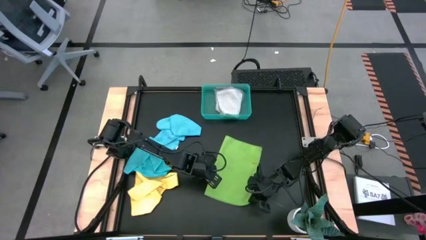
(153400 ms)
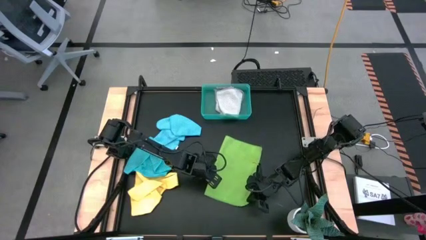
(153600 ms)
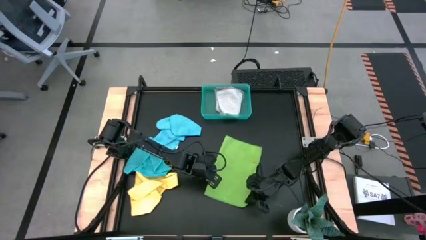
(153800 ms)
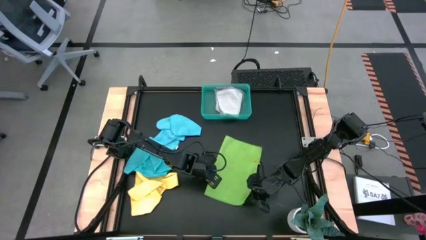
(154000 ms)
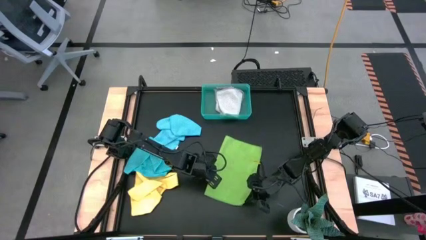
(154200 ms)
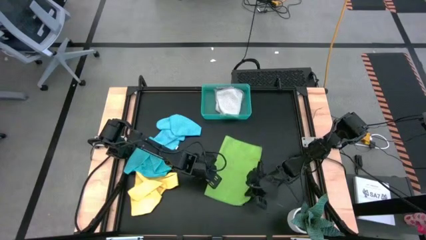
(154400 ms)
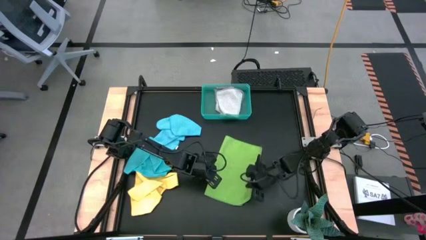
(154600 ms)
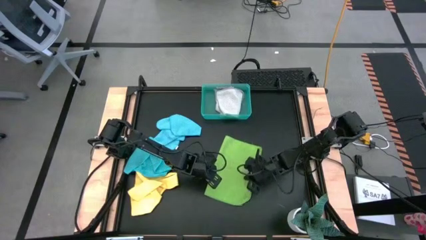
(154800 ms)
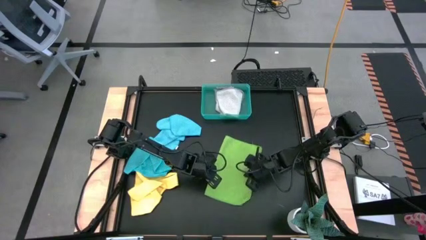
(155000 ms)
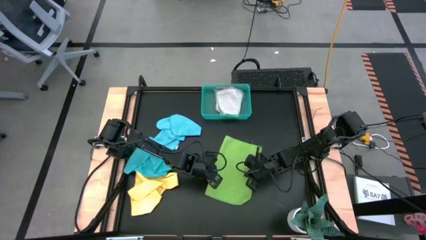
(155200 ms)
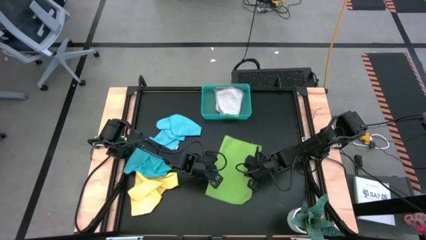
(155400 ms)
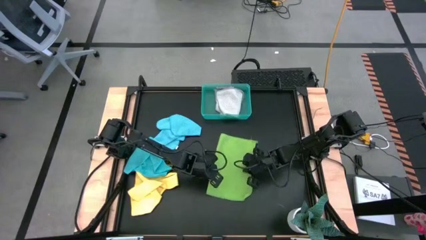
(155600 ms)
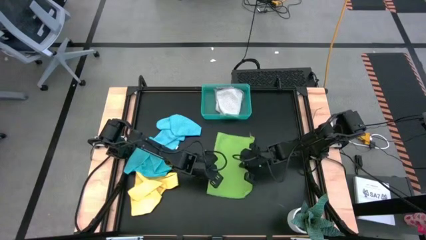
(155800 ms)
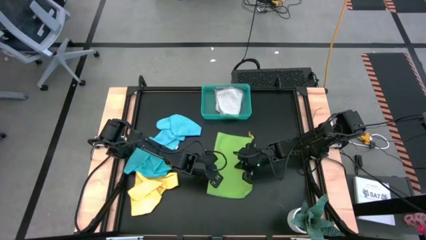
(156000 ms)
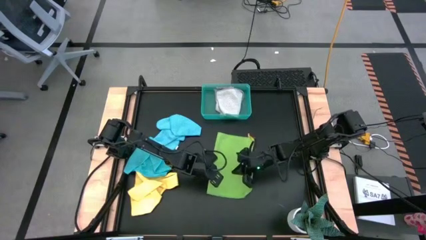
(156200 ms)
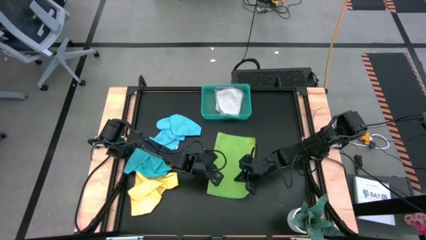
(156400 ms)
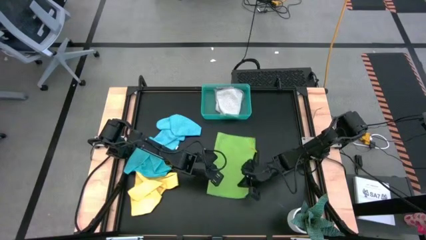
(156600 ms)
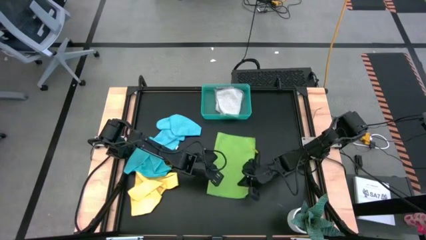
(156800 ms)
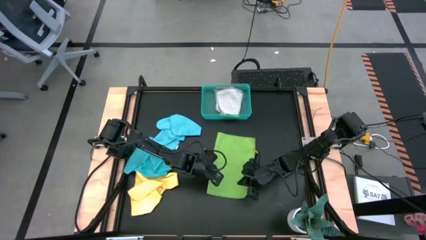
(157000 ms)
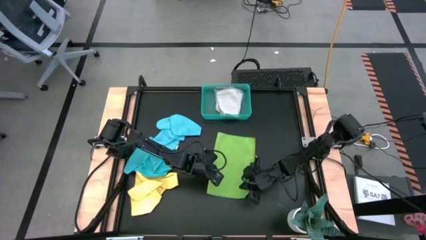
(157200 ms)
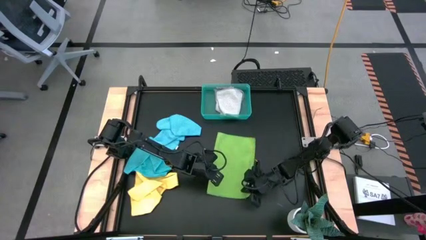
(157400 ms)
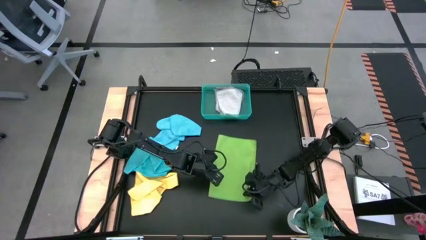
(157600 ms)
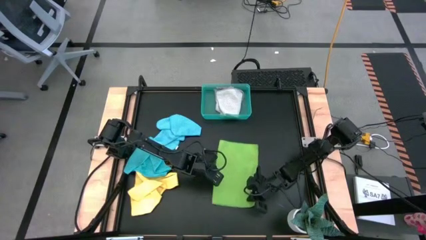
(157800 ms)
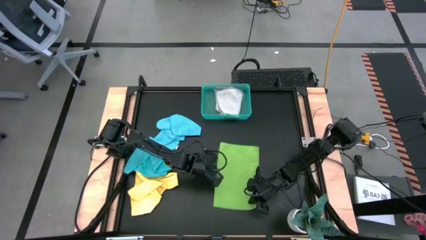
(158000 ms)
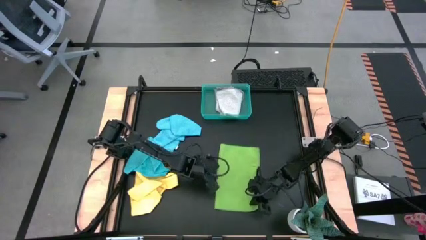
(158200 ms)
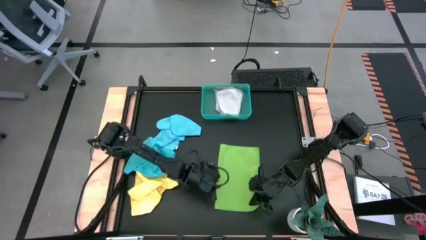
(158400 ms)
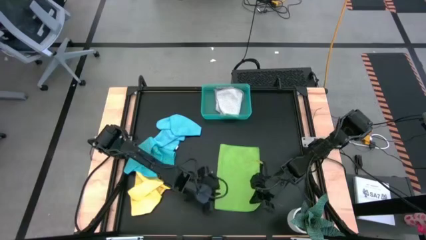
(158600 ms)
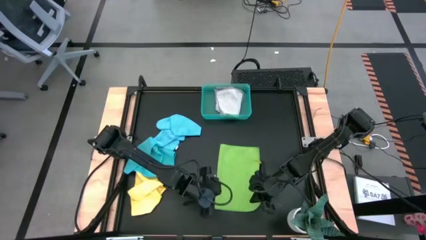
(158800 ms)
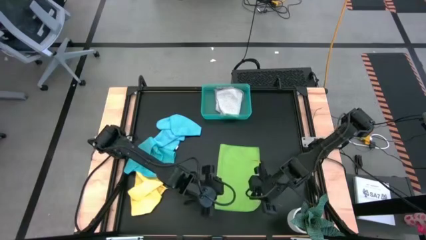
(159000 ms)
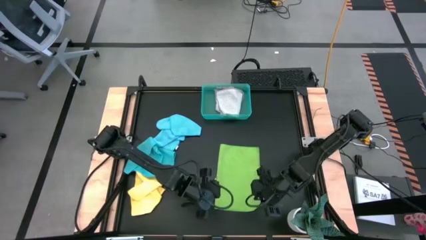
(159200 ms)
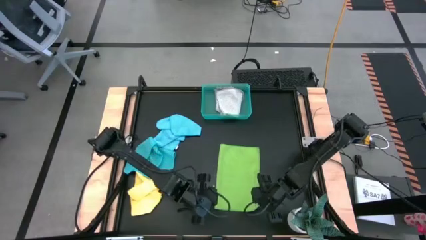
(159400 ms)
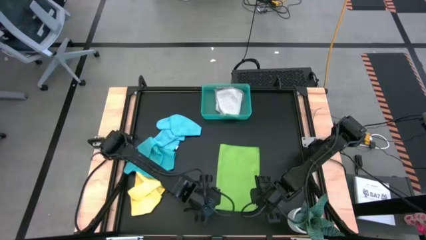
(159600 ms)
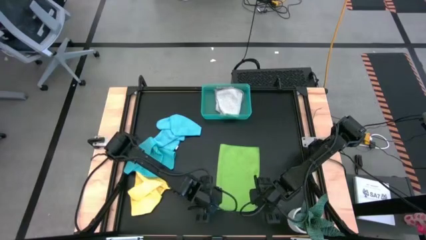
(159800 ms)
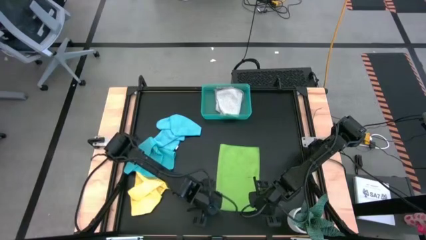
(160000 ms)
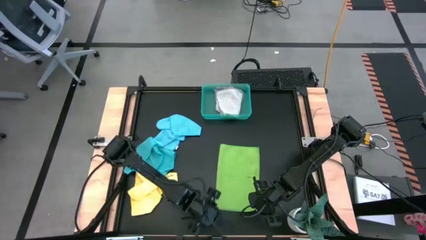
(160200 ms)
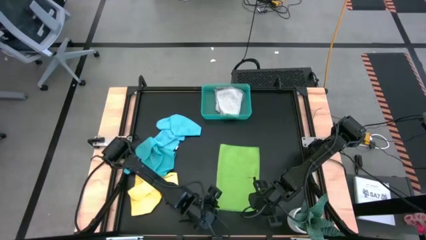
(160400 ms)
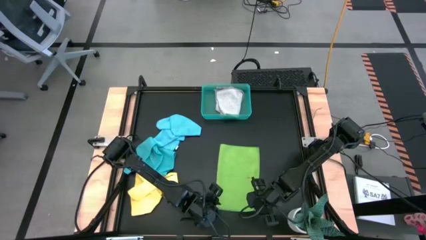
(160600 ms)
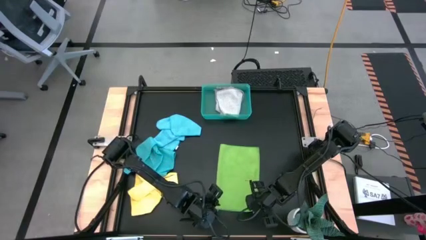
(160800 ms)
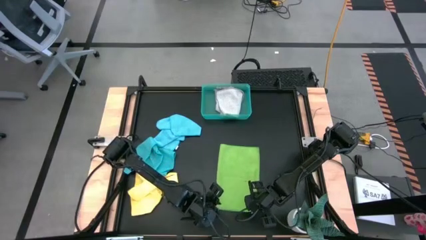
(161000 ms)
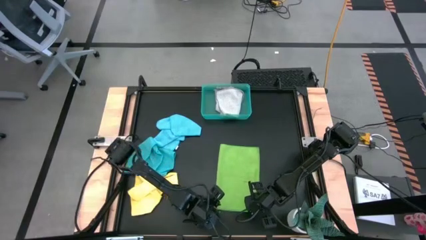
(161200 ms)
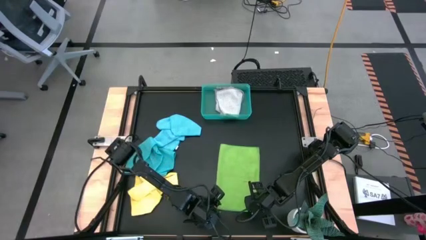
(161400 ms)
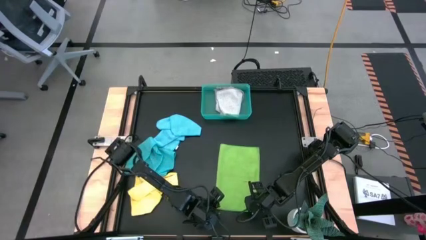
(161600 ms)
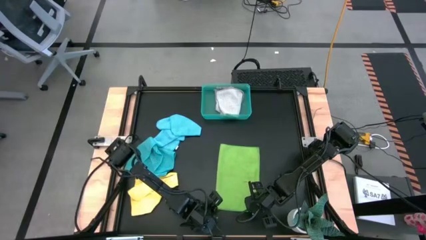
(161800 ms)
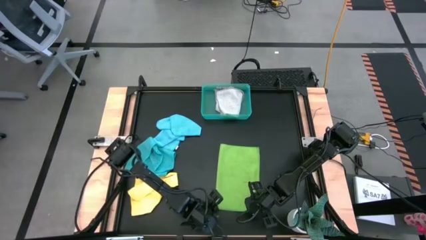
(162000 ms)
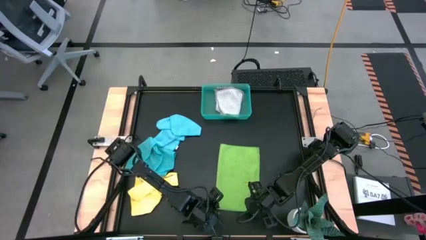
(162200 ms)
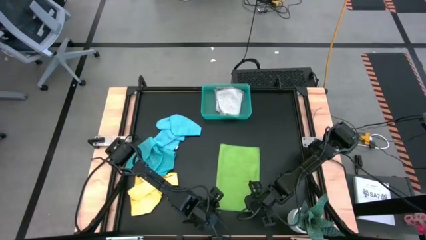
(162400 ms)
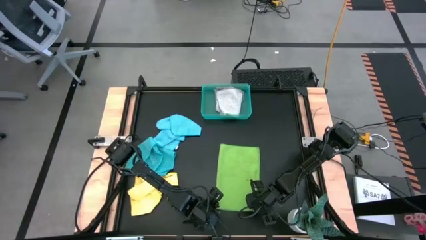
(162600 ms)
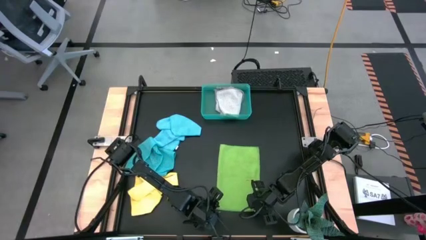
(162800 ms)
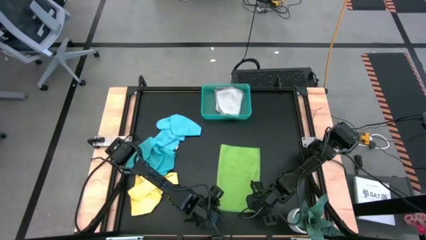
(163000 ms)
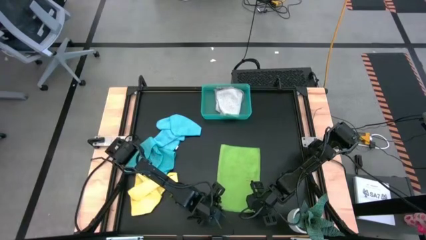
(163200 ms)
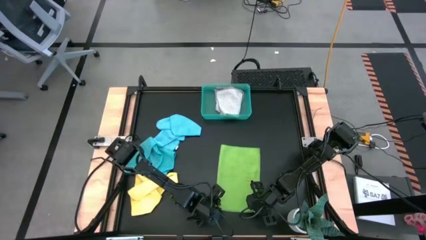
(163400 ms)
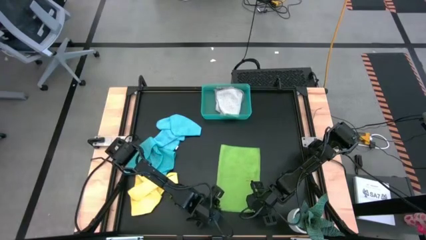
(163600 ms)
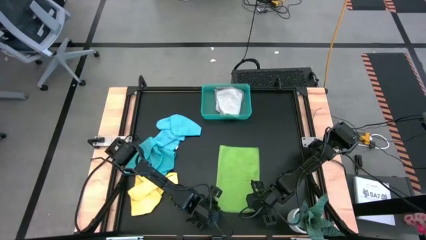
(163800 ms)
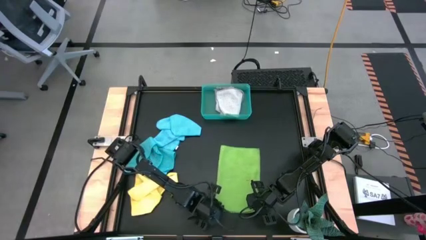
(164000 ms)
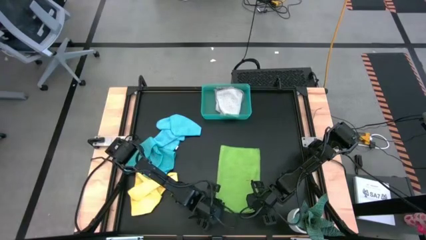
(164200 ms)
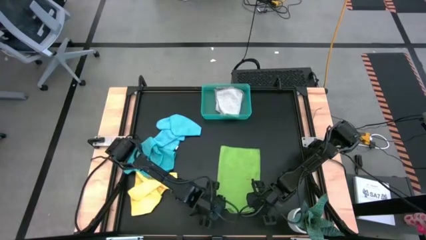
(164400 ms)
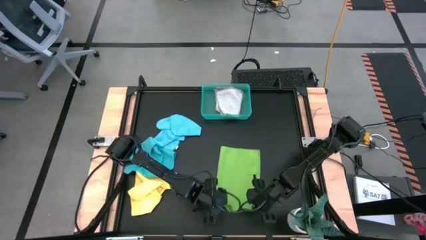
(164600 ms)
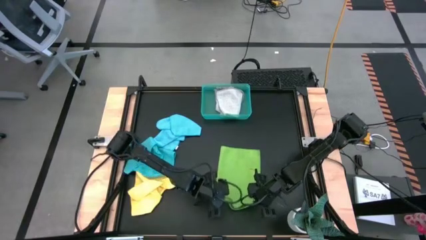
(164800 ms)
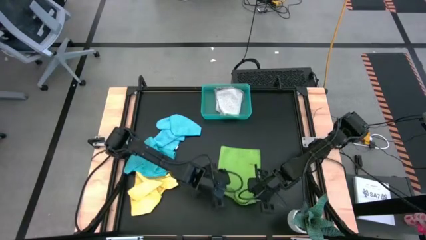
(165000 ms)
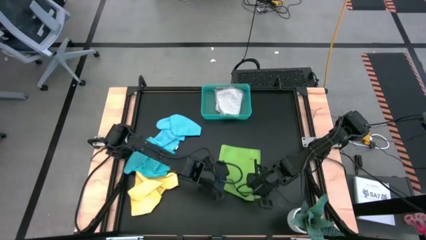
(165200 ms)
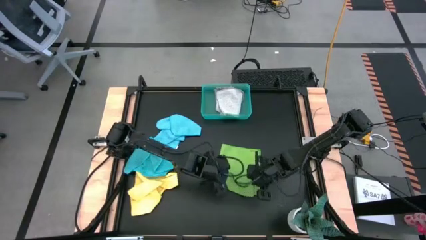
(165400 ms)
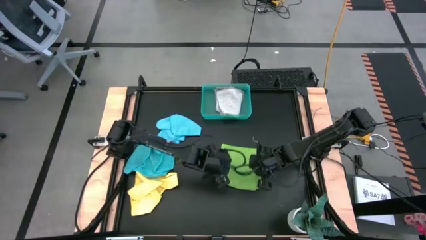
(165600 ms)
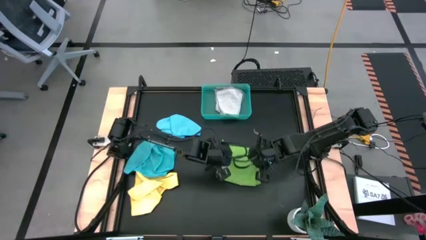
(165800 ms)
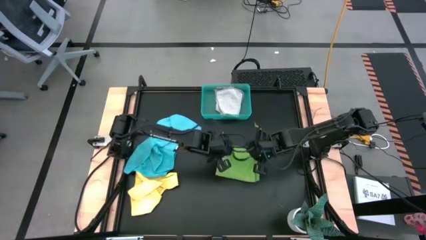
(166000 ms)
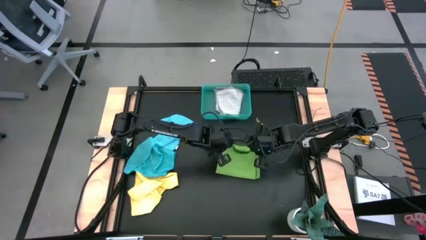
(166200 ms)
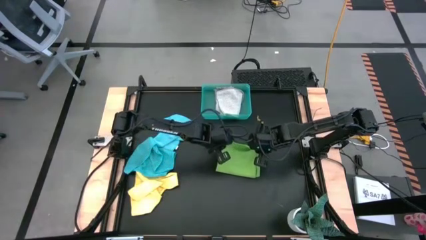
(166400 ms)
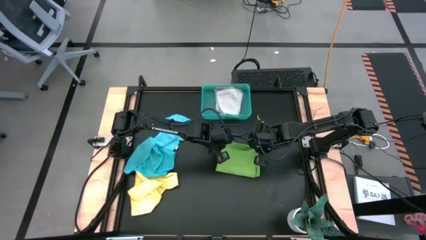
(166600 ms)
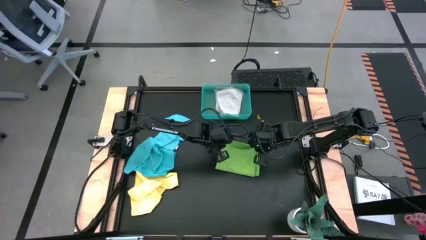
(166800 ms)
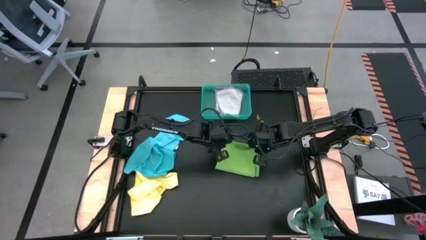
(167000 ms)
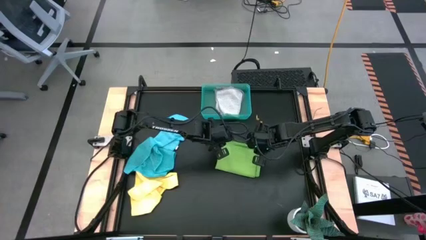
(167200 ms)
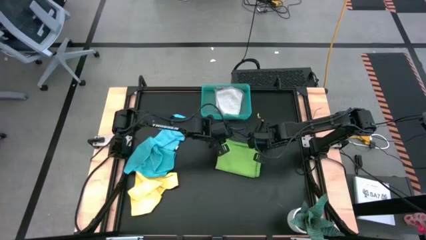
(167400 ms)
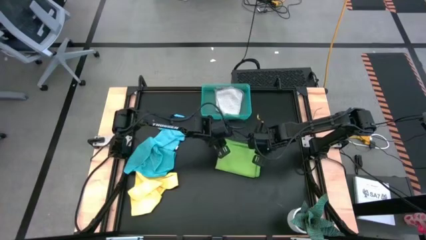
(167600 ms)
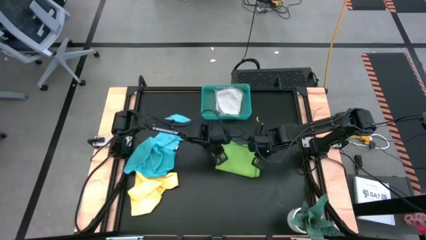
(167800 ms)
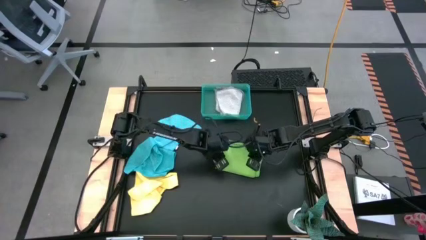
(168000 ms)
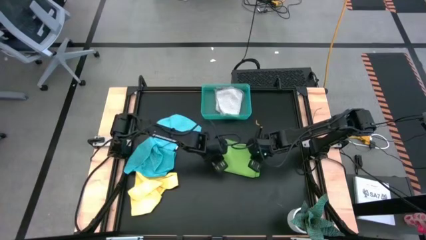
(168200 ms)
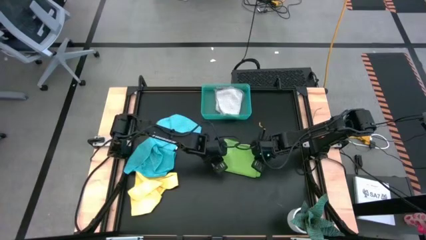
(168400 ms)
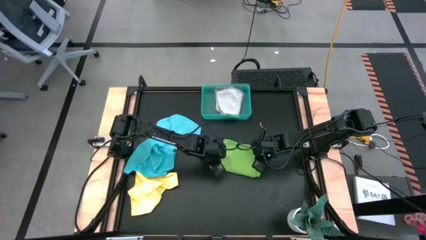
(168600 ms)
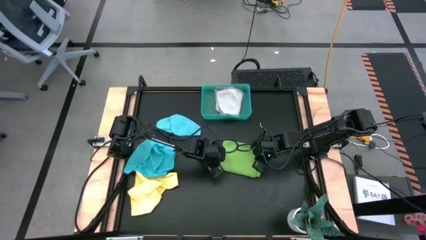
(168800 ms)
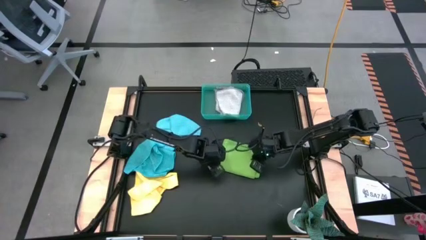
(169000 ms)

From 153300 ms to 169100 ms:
Task: Fold microfiber towels
Fold the green microfiber towel
